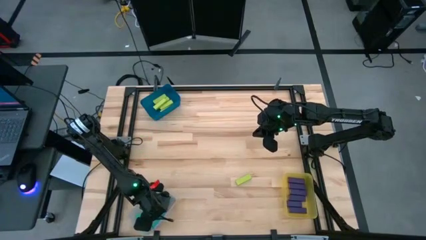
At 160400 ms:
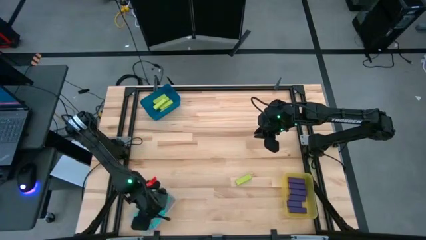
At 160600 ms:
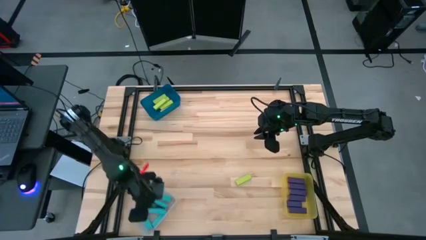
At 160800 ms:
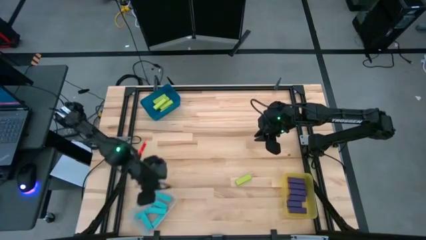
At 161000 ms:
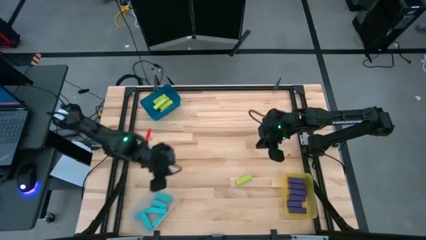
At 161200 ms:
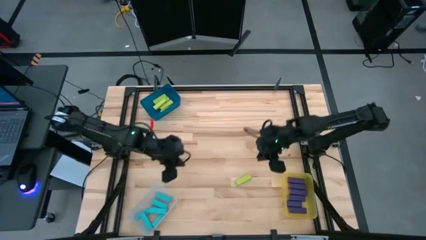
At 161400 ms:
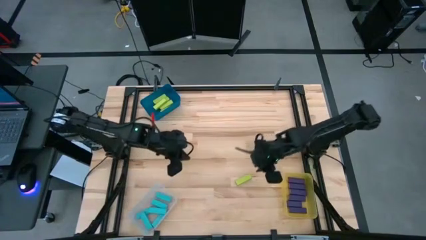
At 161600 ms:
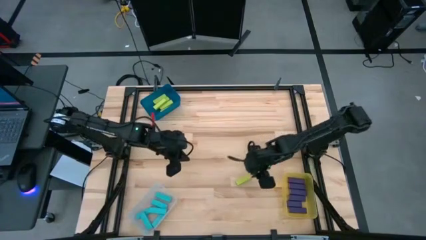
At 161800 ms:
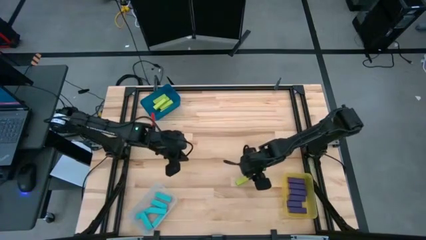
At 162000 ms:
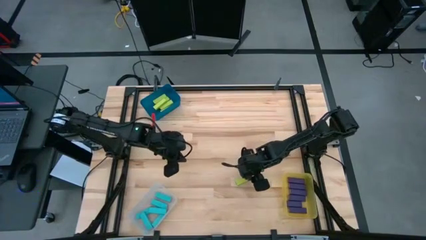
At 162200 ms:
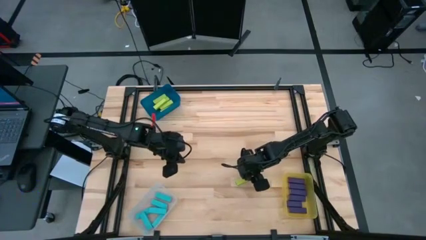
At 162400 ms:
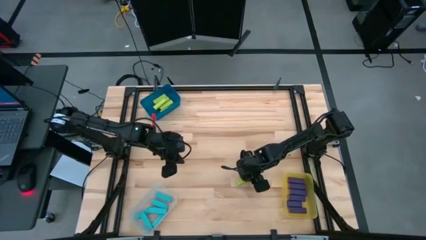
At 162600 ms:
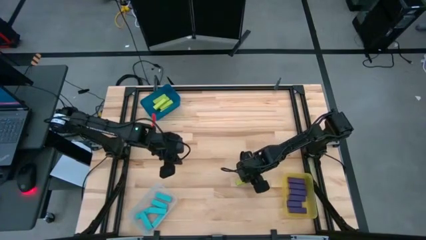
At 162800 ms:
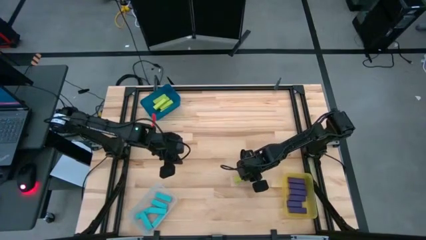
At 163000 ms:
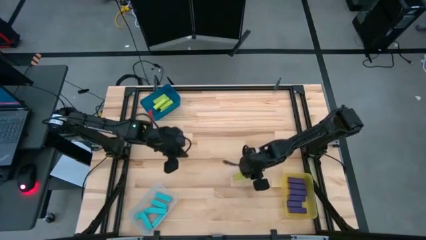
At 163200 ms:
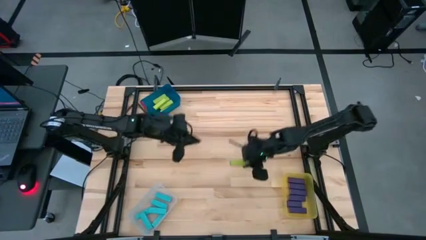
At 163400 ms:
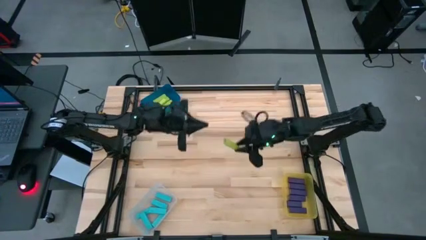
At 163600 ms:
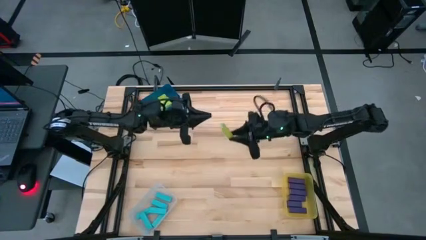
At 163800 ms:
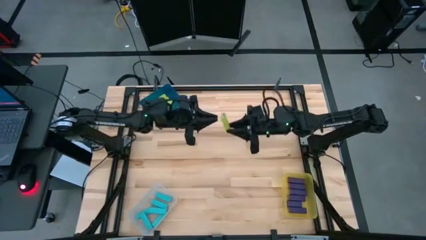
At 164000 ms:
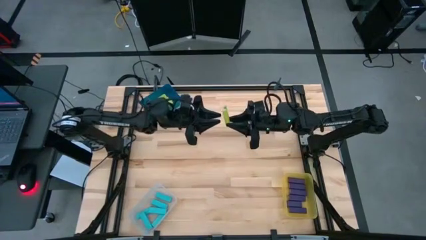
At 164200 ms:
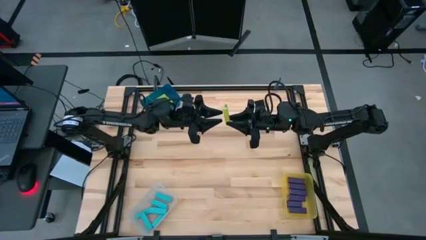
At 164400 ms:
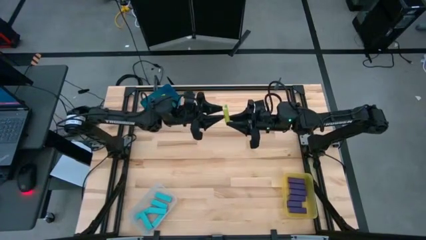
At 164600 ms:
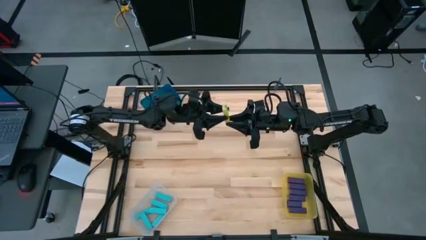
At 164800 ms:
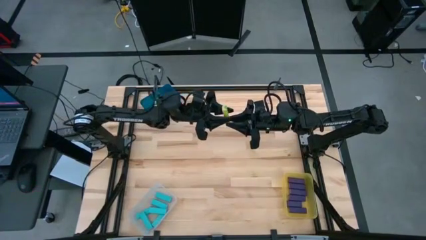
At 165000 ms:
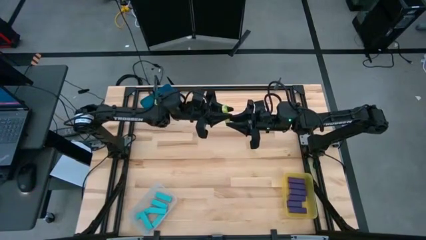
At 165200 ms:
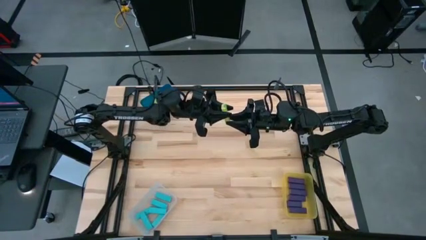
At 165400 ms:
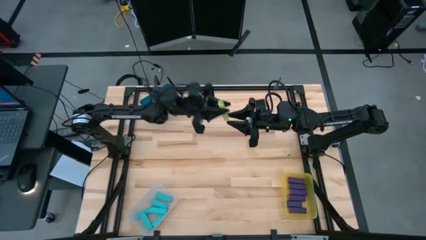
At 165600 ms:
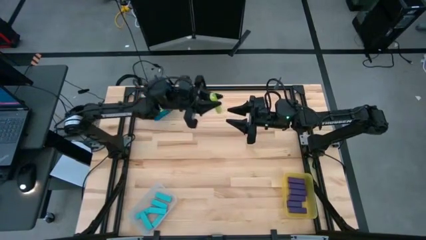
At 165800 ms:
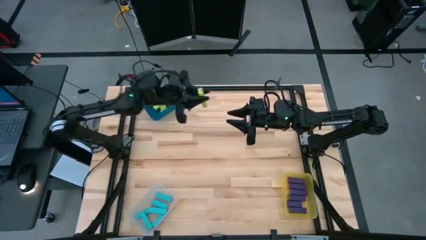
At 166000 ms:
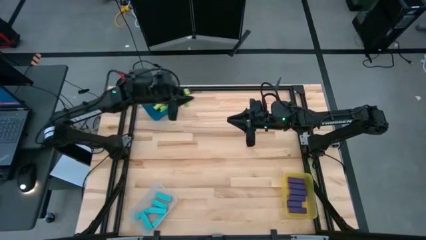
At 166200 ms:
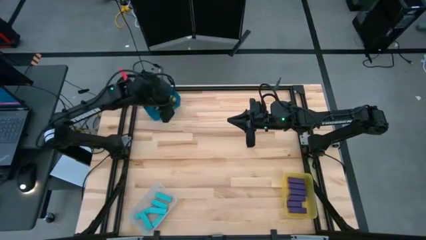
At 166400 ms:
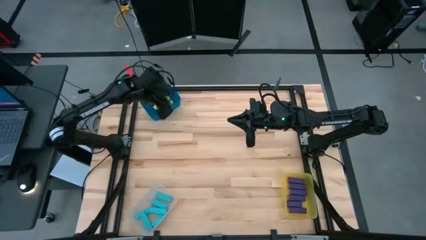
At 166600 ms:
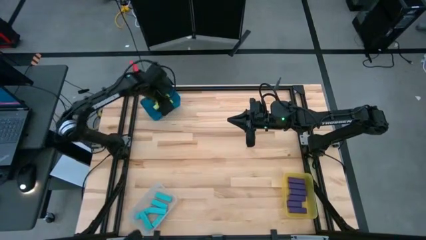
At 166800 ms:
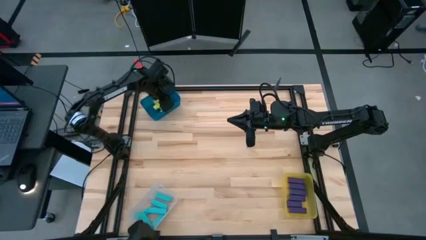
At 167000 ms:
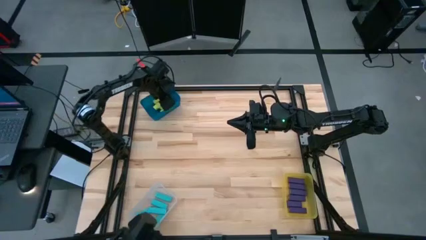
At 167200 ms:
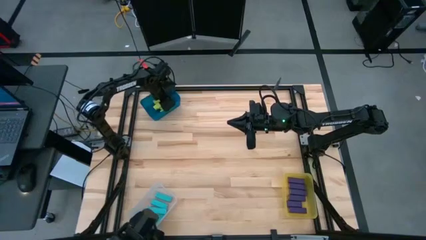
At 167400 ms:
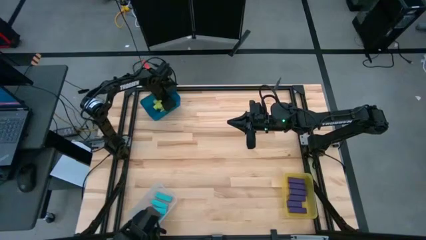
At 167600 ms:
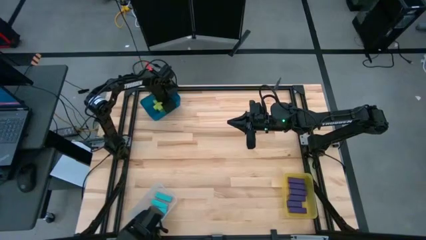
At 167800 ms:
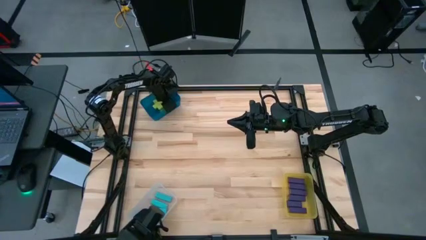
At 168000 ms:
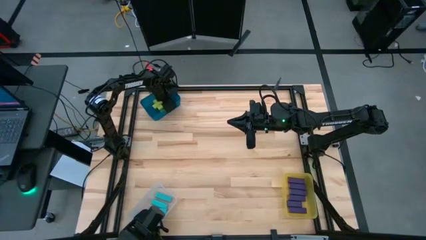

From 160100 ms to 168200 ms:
Task: Sort blocks
Put the green block into the blue bin

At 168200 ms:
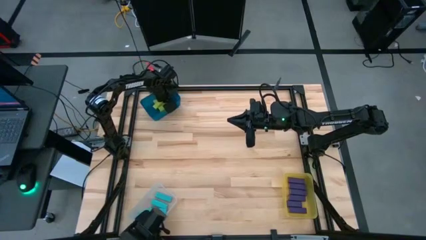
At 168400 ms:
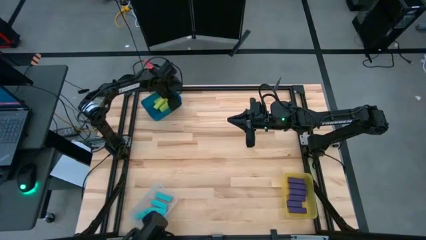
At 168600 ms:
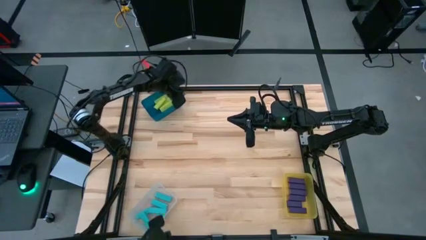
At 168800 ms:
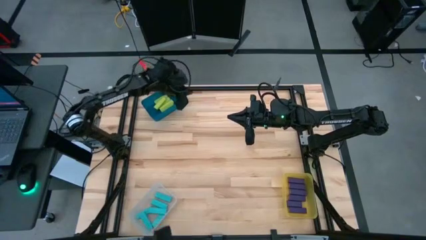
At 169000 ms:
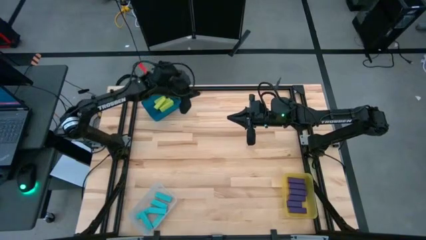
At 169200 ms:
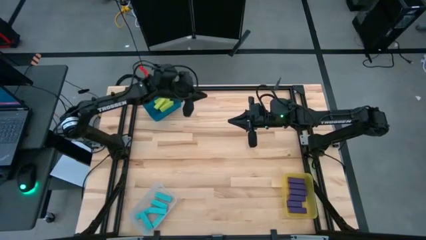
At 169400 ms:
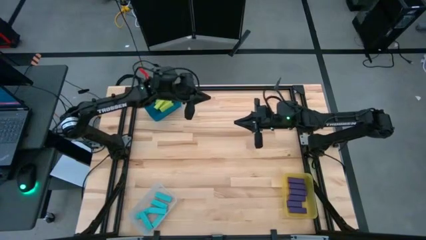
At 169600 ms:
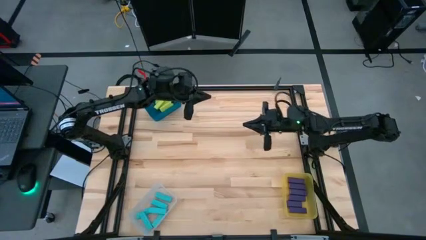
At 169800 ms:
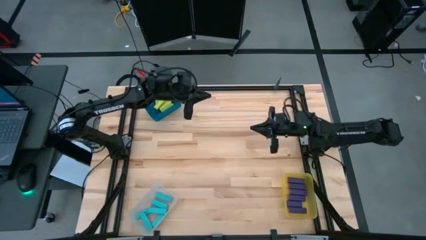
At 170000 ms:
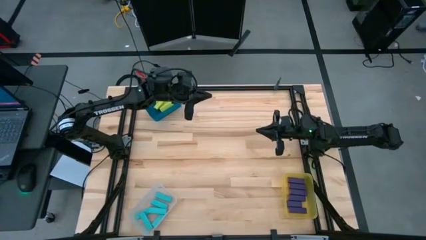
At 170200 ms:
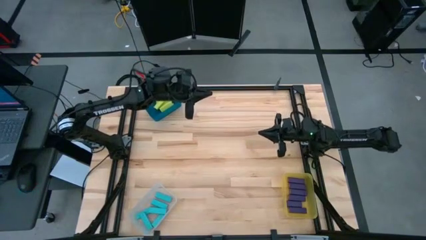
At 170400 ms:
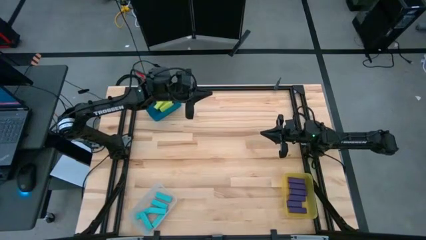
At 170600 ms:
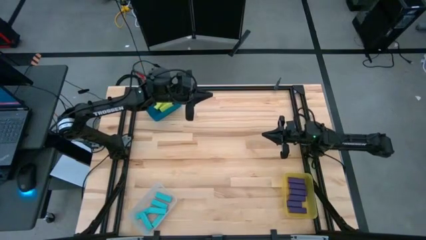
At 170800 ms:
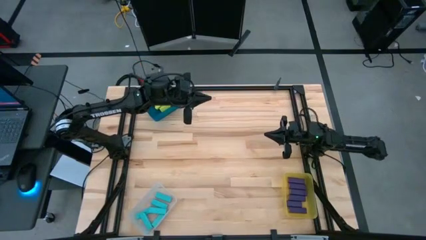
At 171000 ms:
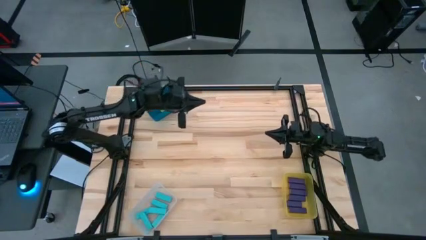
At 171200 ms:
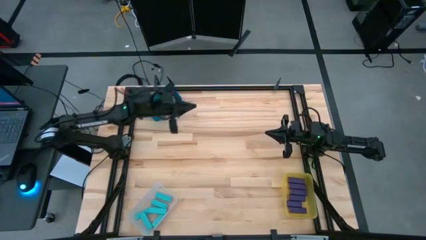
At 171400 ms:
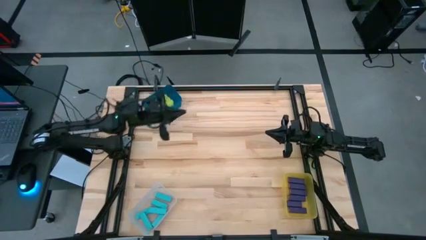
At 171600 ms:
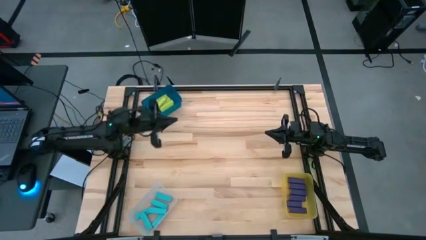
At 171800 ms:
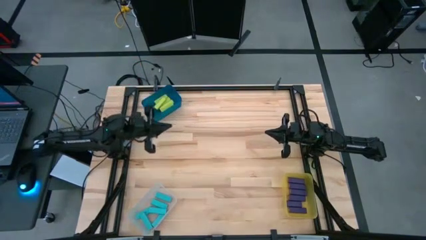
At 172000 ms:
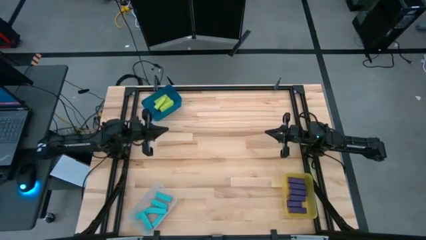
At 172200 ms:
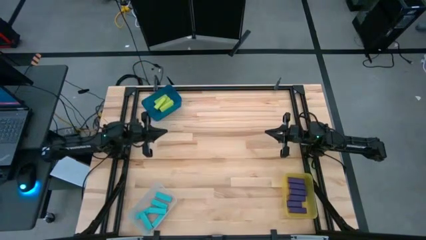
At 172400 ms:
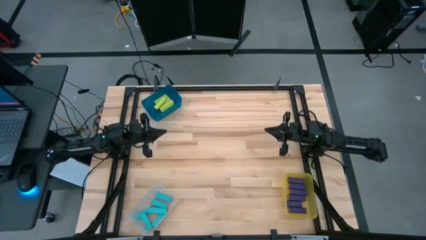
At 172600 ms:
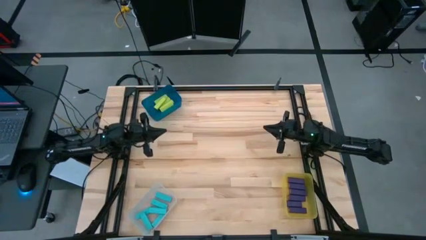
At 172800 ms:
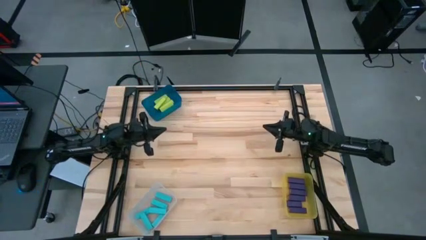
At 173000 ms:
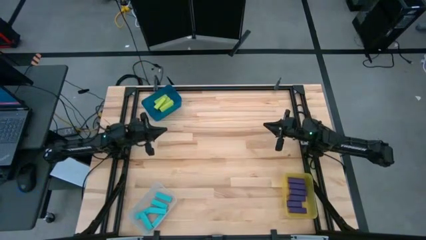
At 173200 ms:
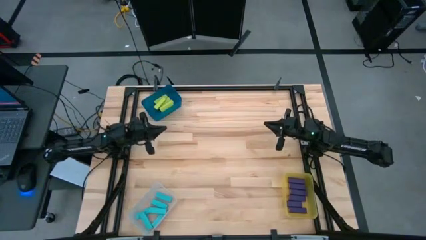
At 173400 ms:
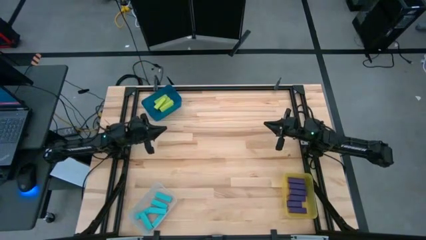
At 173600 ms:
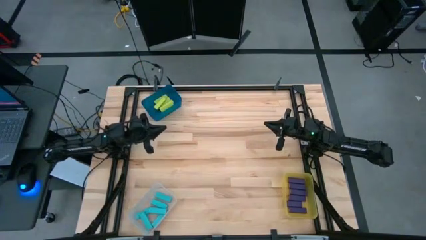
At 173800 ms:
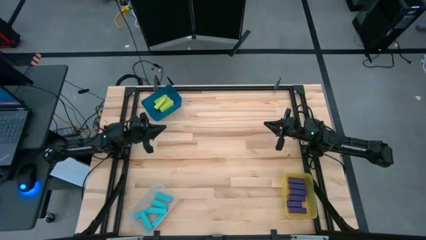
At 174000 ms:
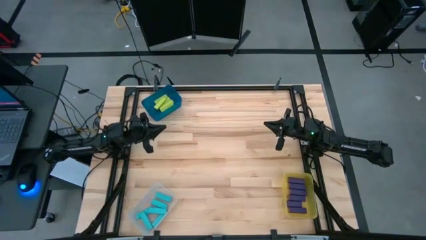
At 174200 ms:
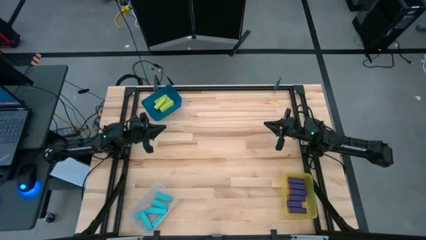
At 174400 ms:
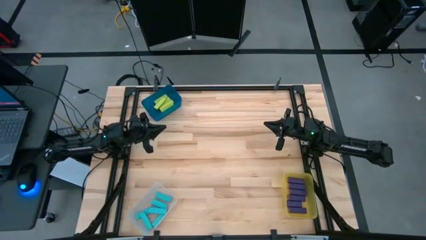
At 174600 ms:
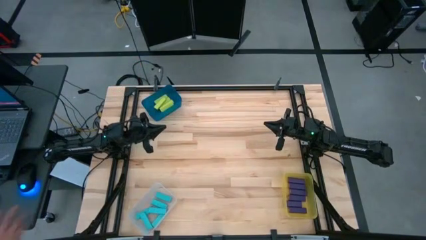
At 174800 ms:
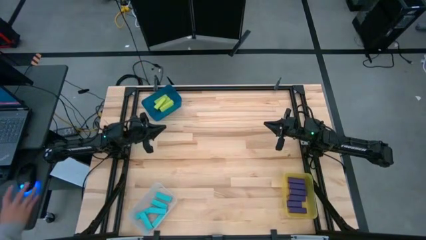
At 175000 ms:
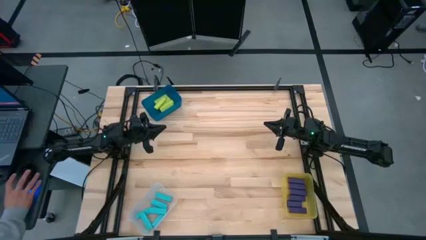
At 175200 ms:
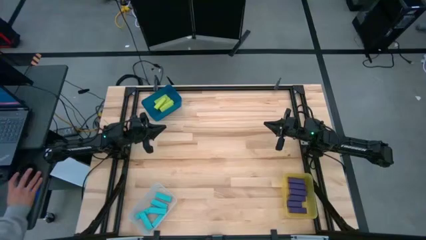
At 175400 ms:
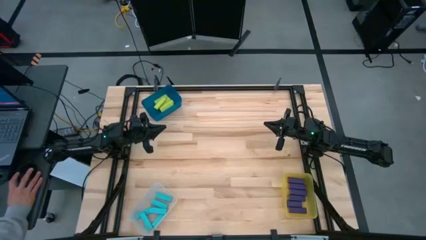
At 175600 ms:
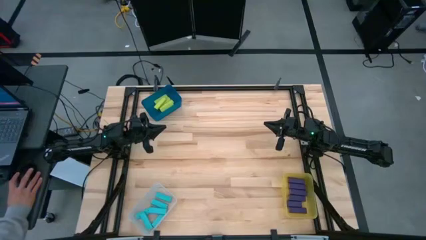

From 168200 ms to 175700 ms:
Return to Home Position

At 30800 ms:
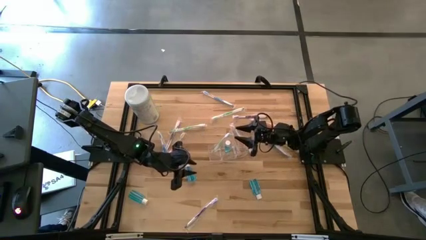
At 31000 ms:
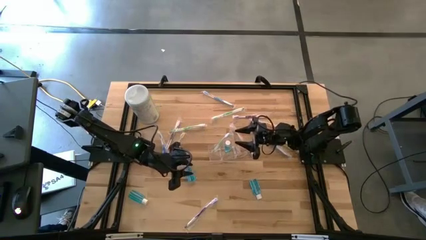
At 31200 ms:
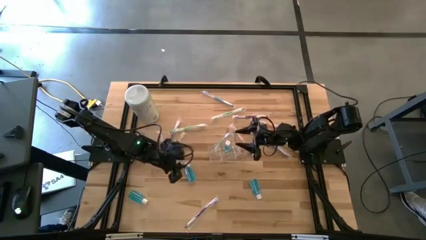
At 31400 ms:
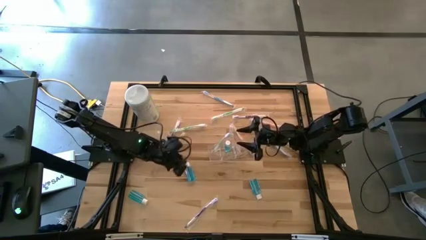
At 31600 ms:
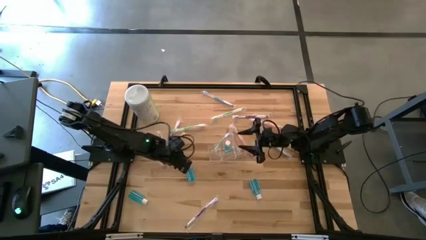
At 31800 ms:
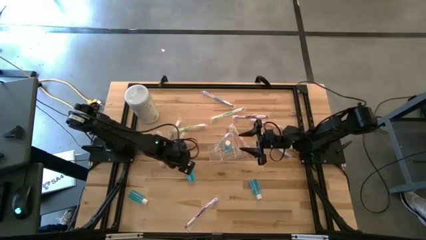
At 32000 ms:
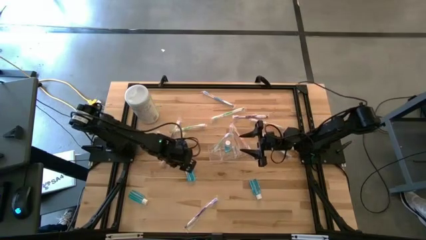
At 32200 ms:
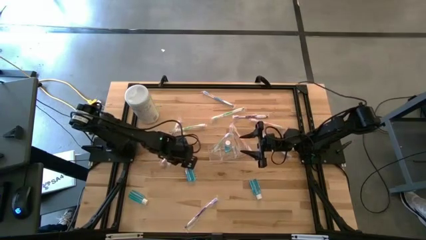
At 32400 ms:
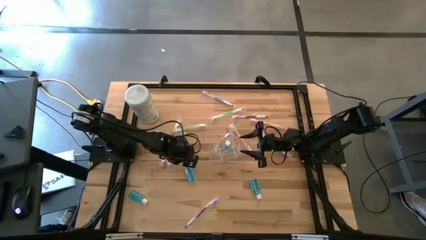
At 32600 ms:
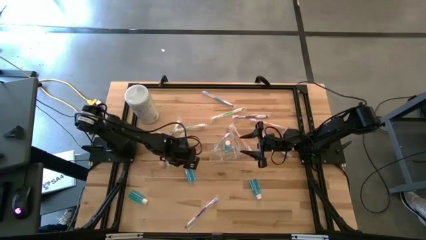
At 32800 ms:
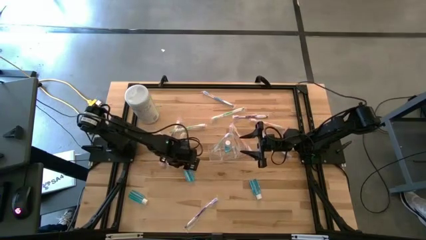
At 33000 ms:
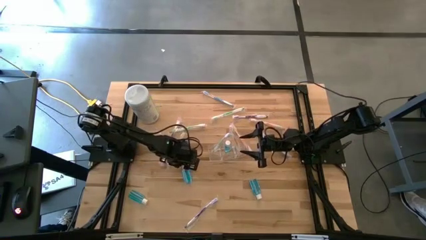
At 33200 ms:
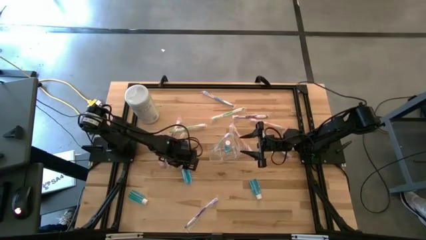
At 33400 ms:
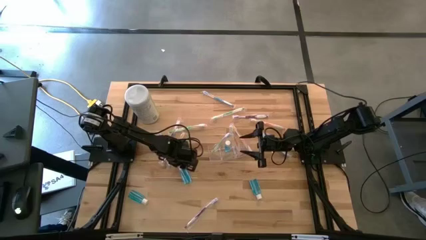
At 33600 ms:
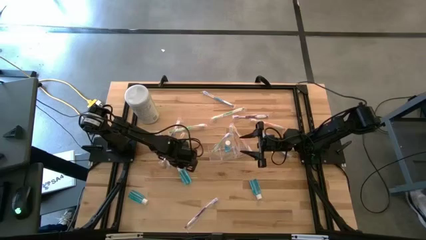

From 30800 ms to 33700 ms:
Task: Pick & Place toothbrushing station
Put the blue mouthwash into the transparent organizer
